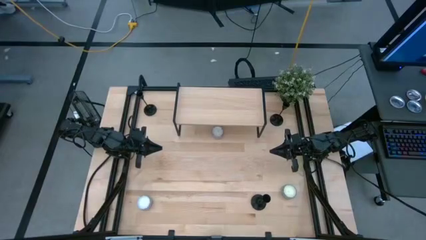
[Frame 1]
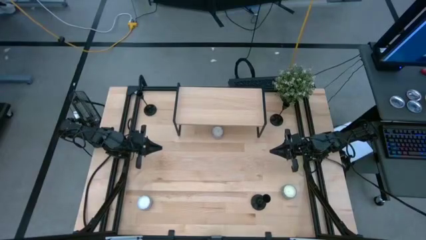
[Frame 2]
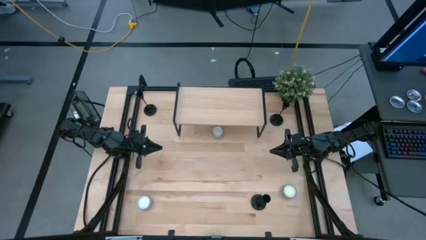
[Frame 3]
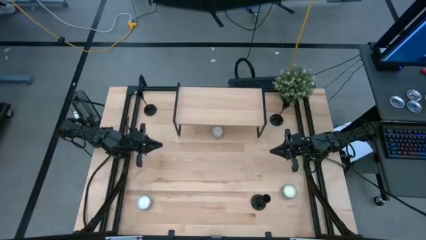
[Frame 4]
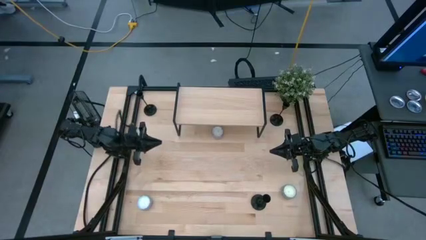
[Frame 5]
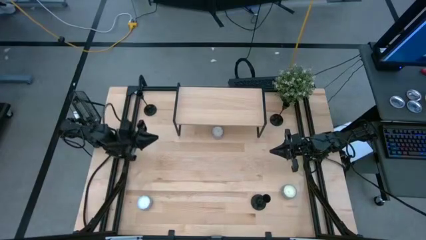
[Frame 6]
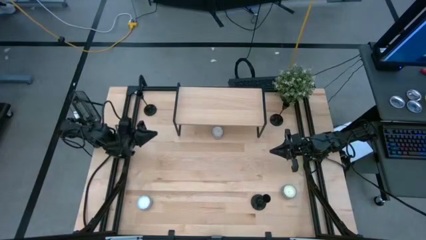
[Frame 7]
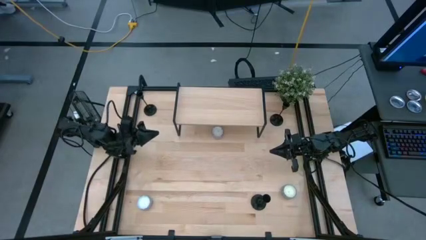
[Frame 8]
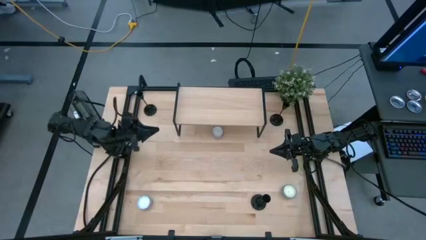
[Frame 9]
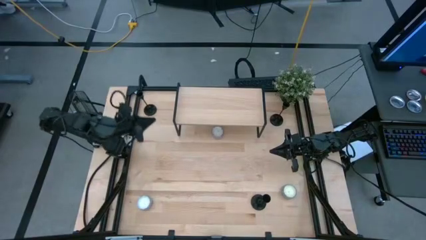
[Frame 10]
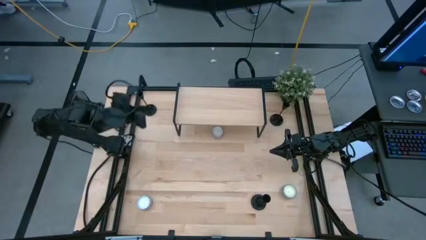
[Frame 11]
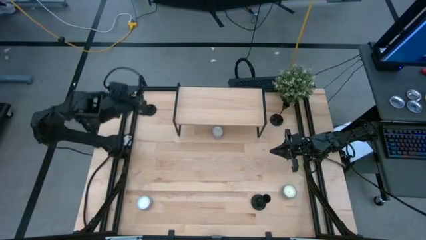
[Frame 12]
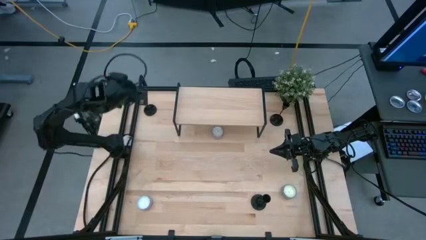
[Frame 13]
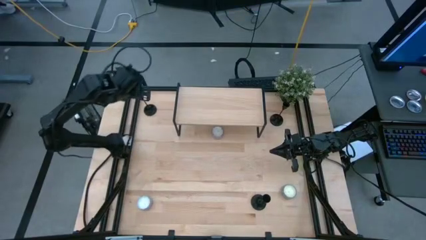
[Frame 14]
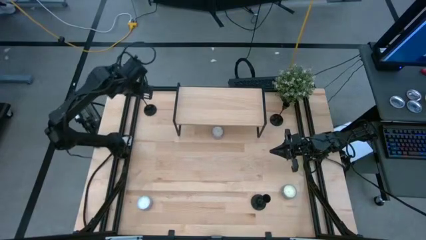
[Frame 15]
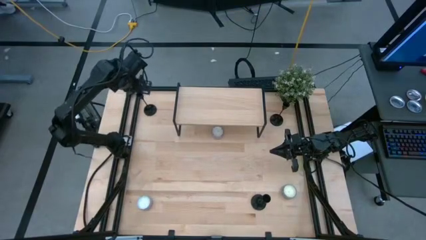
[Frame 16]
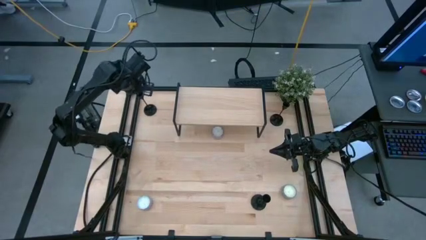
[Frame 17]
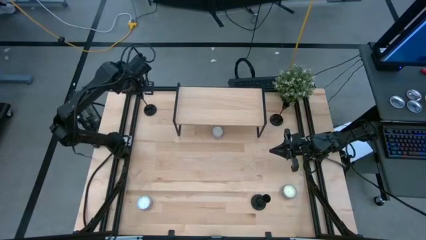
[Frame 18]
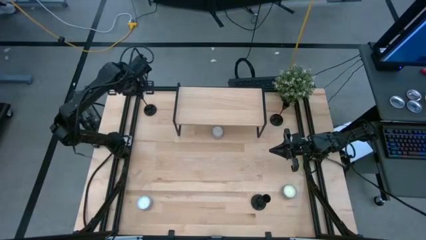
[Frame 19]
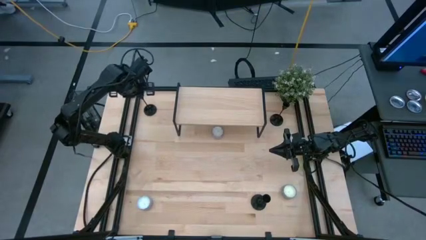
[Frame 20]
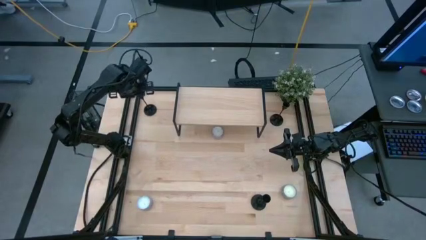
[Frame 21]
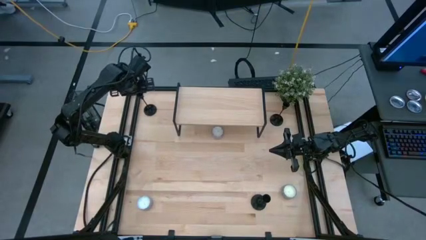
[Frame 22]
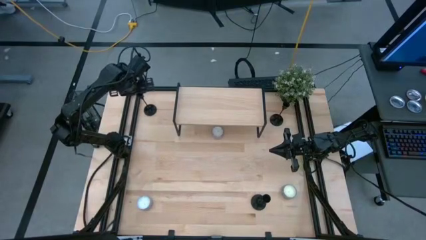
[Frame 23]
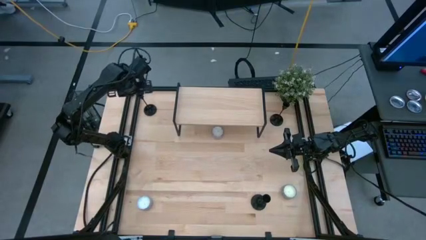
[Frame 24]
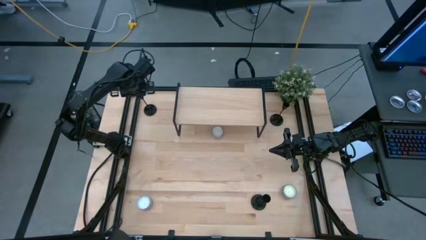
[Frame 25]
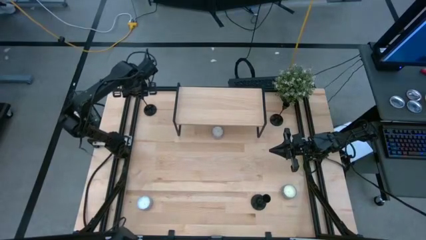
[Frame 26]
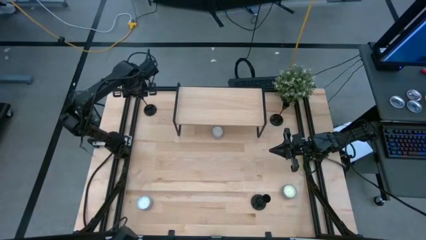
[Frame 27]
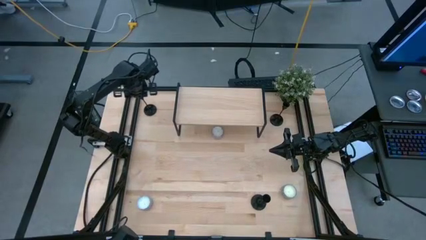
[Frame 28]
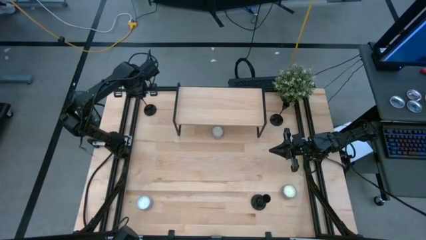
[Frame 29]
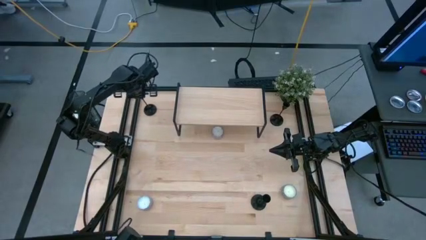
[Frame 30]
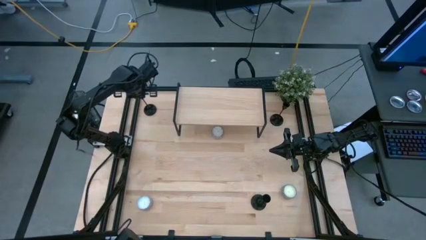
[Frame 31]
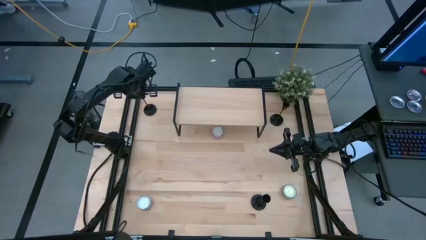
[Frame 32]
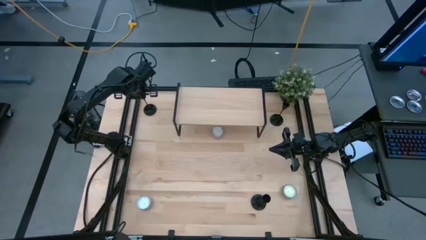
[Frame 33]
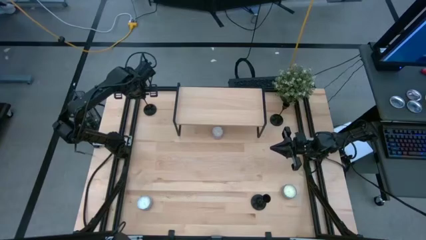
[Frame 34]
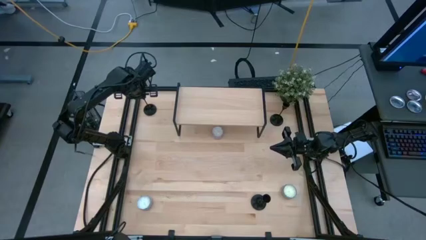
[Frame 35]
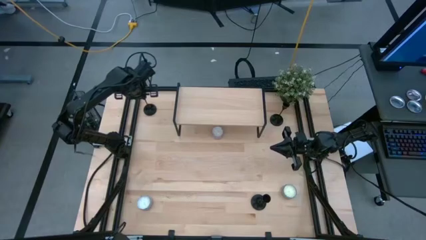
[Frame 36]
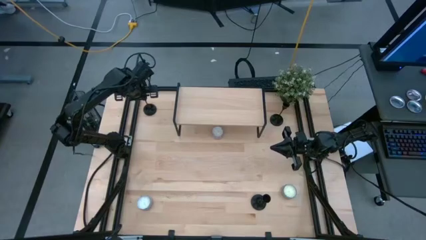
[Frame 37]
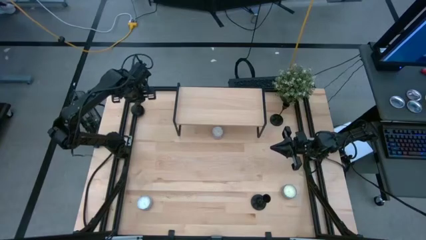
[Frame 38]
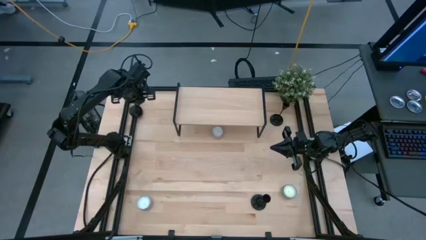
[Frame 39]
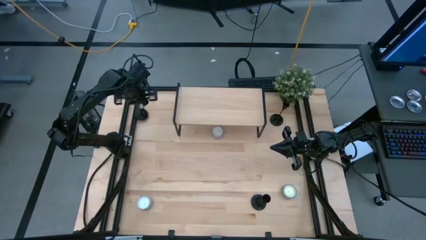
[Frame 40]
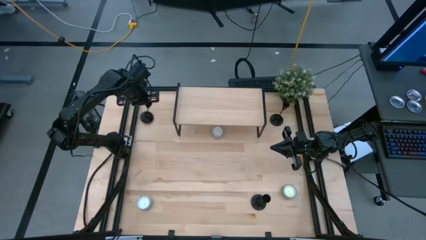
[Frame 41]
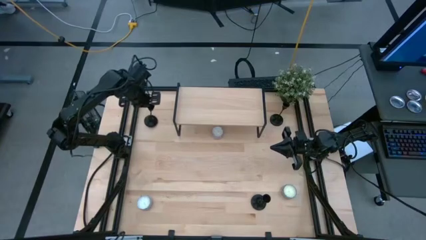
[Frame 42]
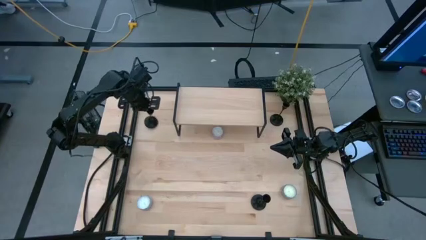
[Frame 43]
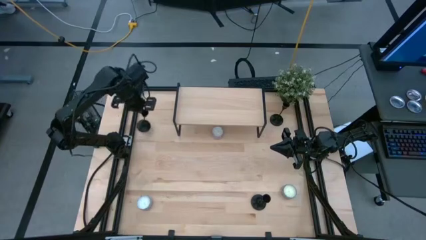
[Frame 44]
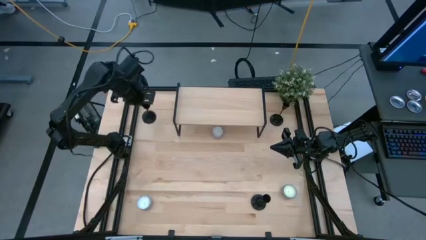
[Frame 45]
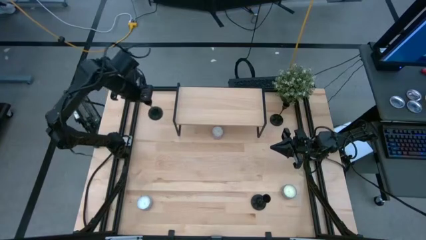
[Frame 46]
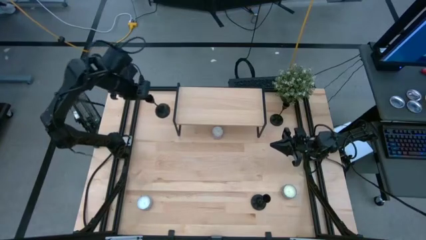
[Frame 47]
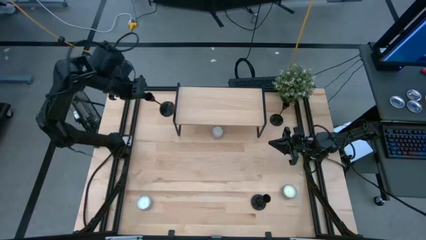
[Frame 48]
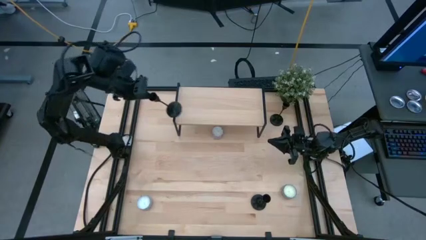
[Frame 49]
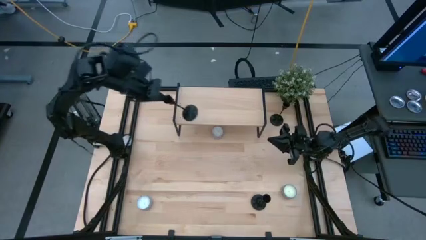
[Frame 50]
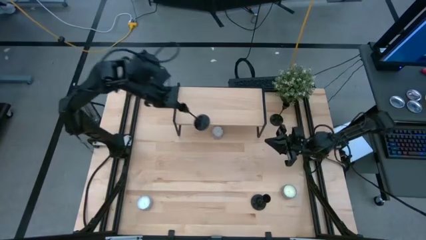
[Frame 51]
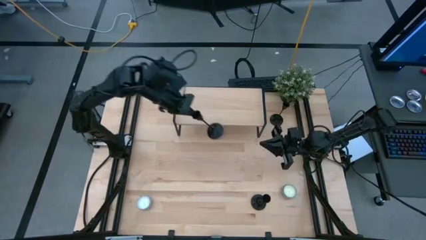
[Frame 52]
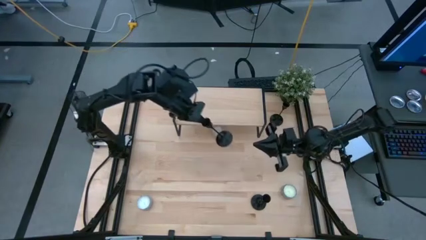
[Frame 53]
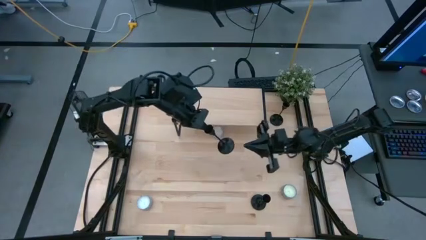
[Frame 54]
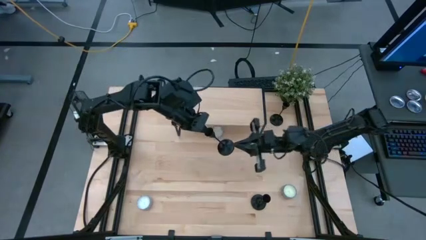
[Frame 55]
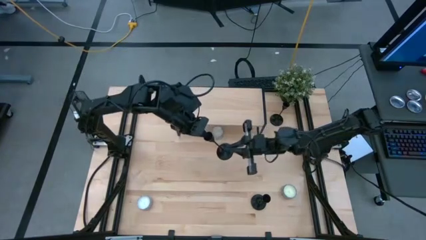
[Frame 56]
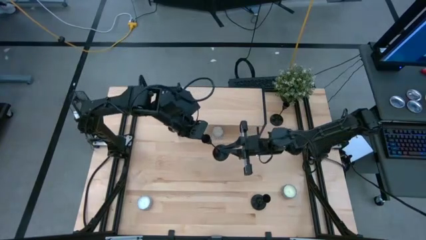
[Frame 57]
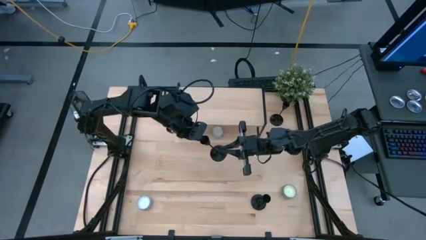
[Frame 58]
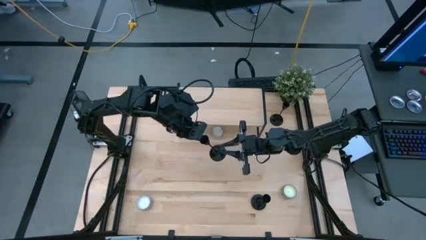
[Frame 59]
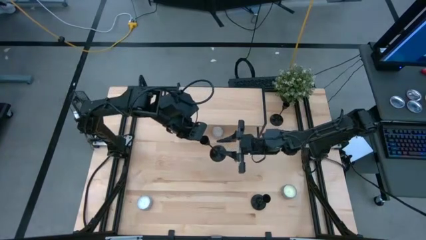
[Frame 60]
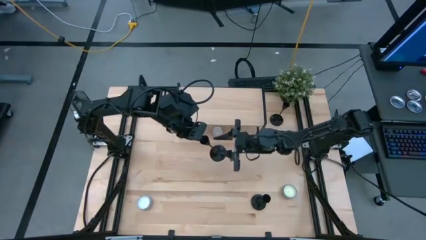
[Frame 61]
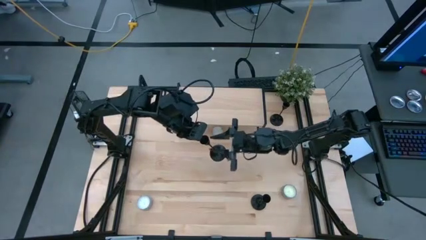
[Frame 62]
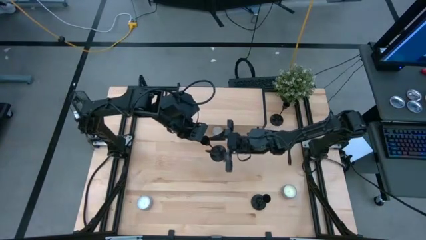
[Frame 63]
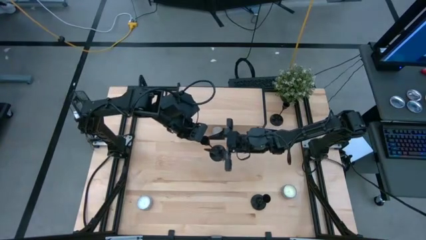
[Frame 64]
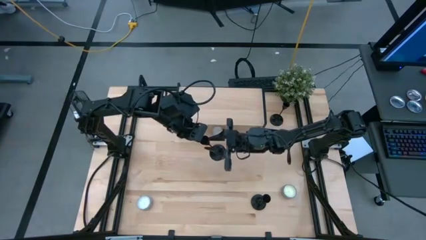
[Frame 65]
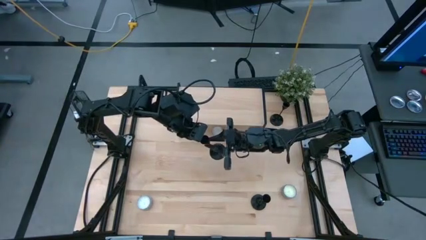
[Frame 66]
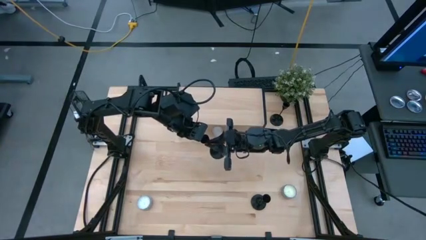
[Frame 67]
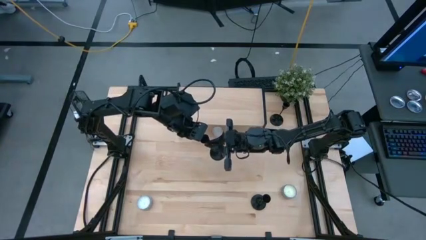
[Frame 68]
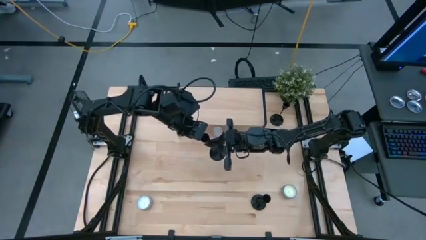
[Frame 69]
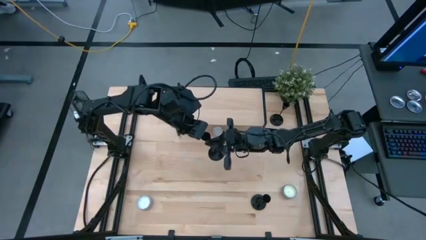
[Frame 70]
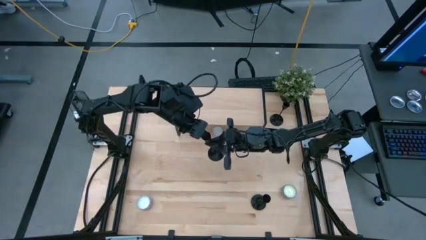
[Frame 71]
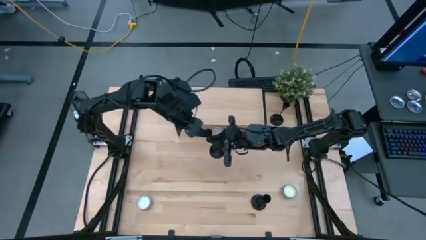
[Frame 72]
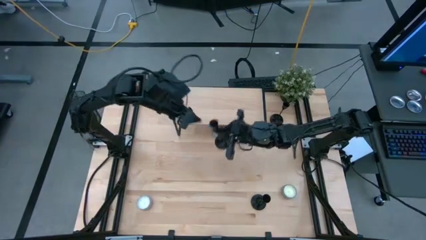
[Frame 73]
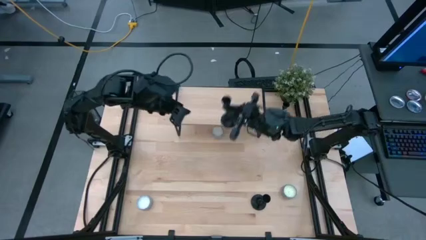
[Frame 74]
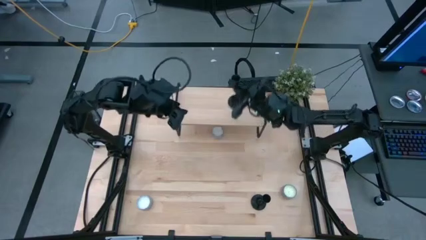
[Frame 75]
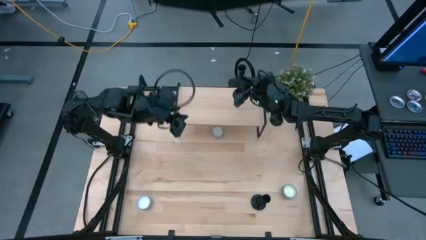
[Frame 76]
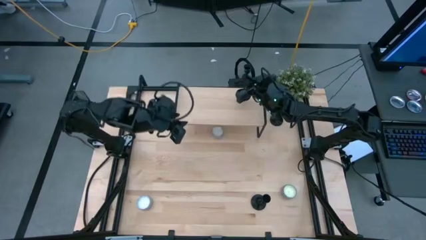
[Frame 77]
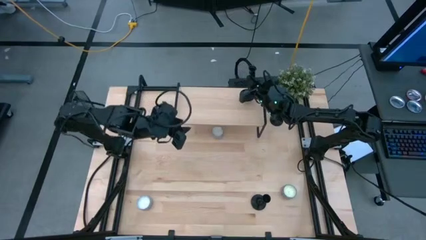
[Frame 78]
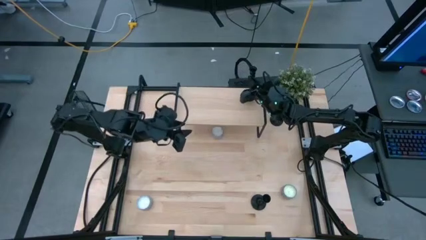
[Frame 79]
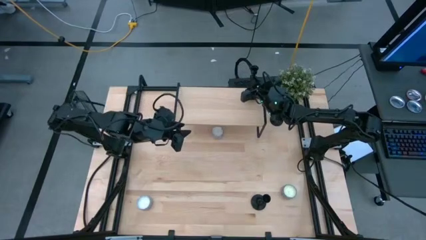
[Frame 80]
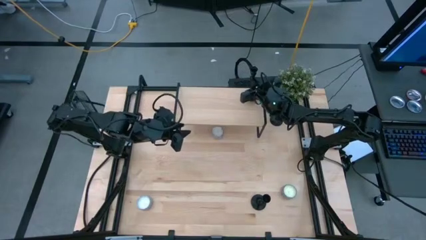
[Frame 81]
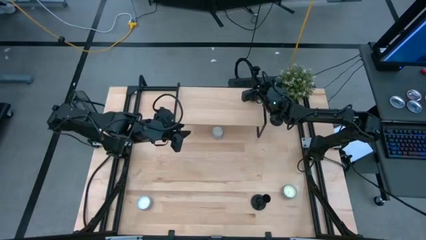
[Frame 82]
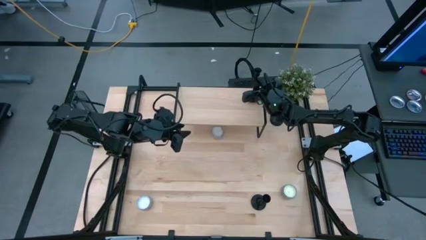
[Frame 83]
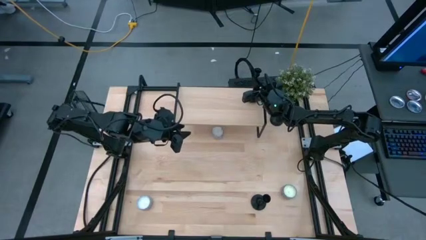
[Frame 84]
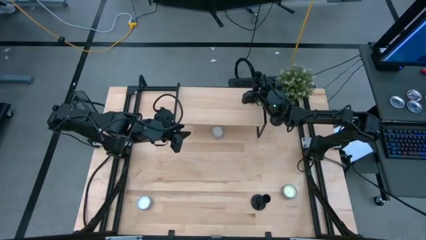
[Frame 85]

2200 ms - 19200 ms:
Task: Pick & Place candle stick holders
Put the top left black candle holder on the shelf
